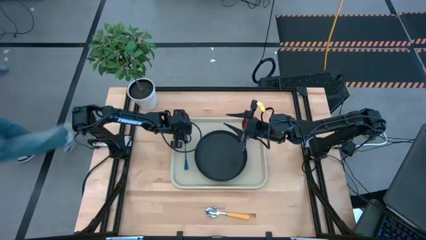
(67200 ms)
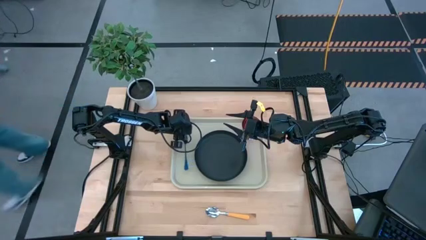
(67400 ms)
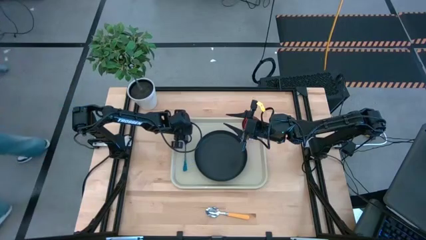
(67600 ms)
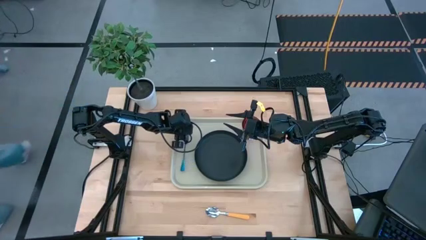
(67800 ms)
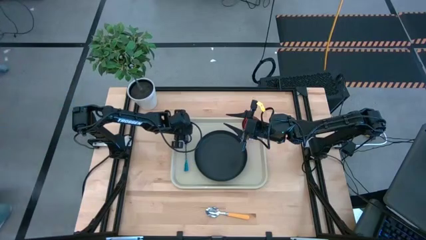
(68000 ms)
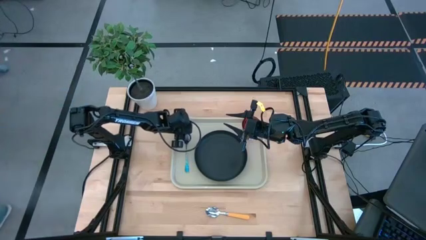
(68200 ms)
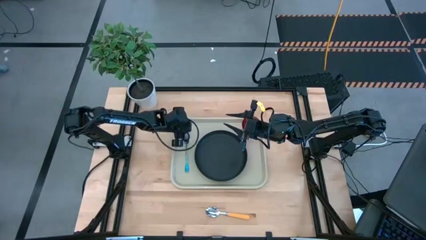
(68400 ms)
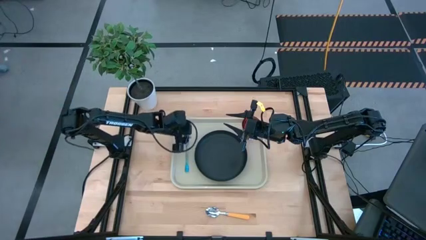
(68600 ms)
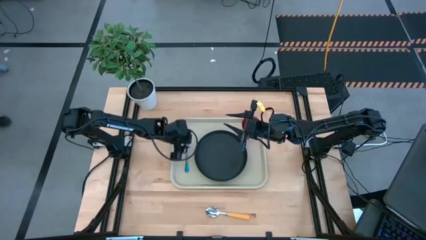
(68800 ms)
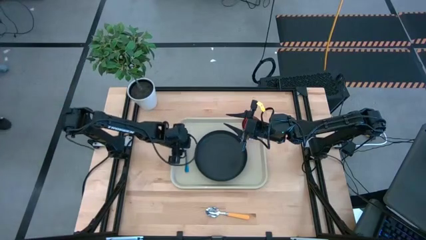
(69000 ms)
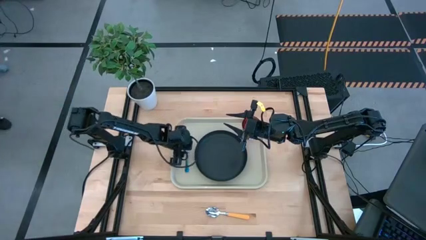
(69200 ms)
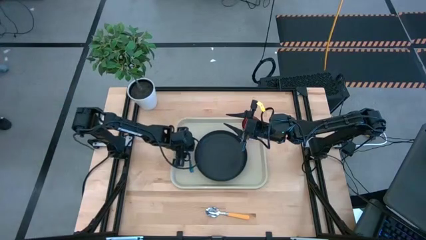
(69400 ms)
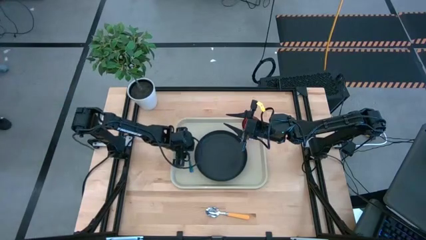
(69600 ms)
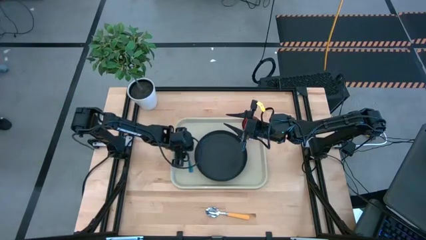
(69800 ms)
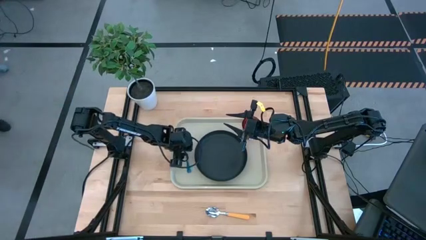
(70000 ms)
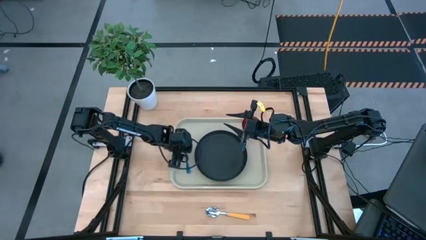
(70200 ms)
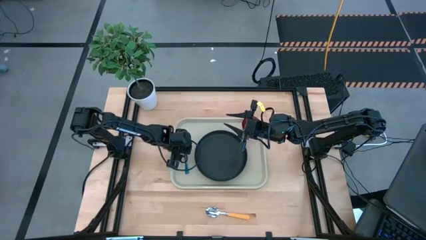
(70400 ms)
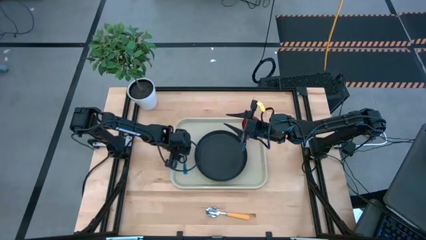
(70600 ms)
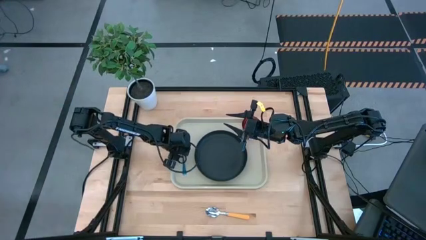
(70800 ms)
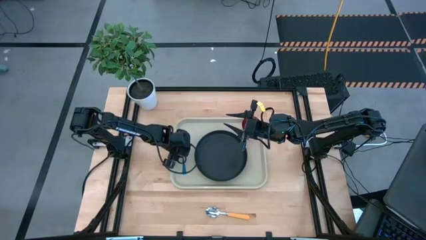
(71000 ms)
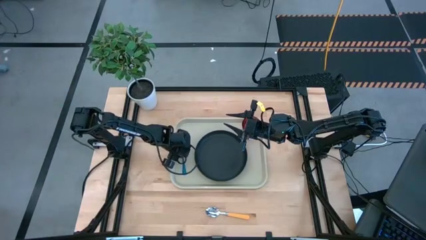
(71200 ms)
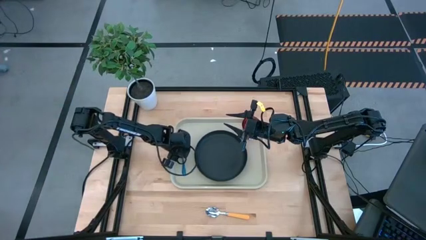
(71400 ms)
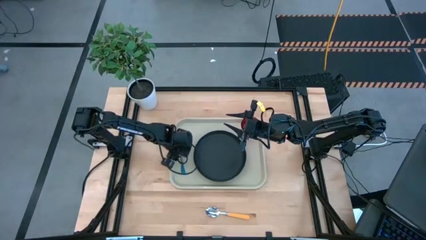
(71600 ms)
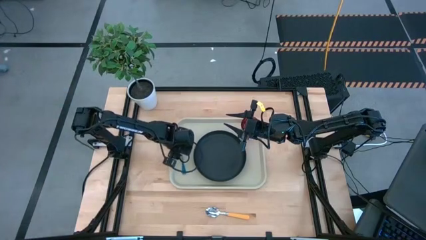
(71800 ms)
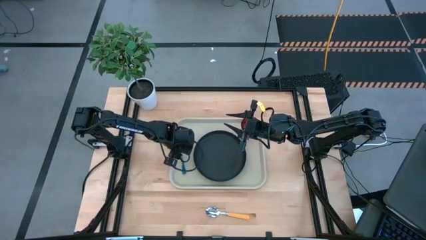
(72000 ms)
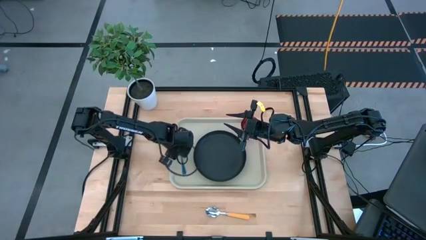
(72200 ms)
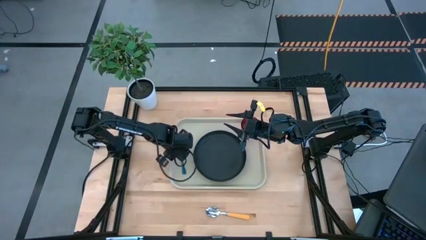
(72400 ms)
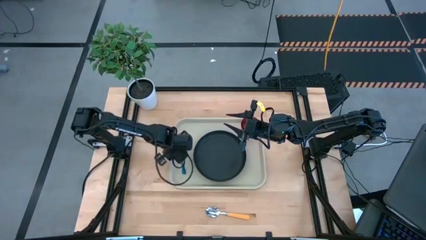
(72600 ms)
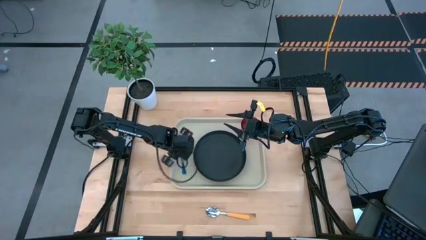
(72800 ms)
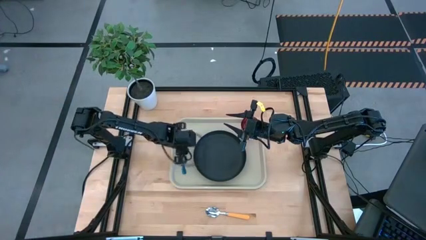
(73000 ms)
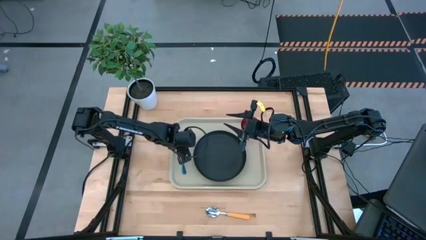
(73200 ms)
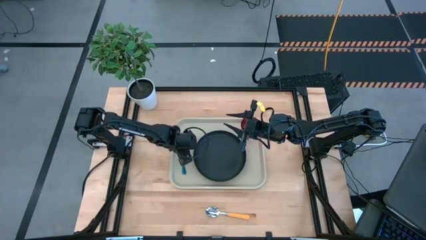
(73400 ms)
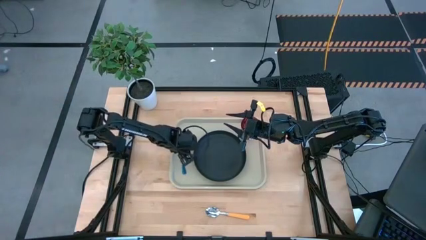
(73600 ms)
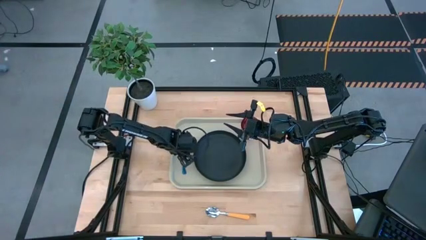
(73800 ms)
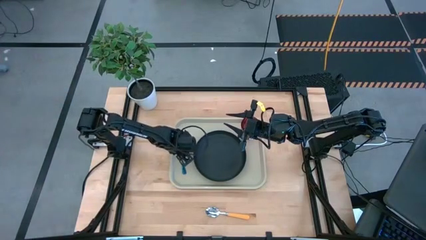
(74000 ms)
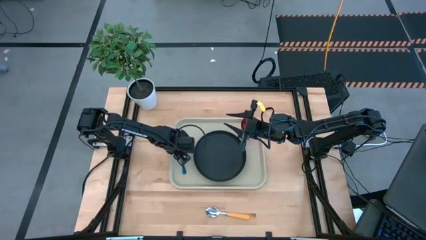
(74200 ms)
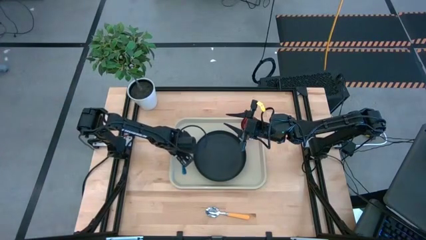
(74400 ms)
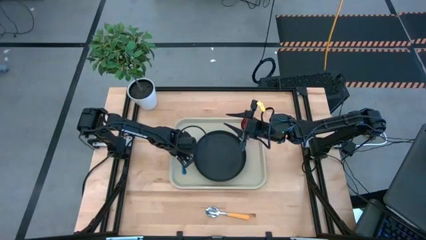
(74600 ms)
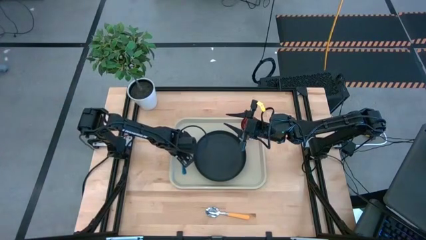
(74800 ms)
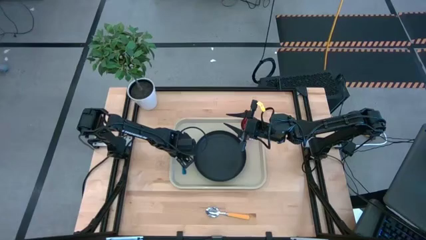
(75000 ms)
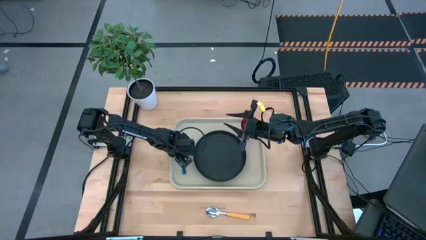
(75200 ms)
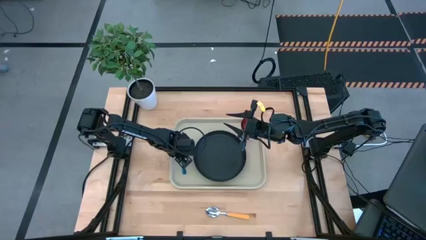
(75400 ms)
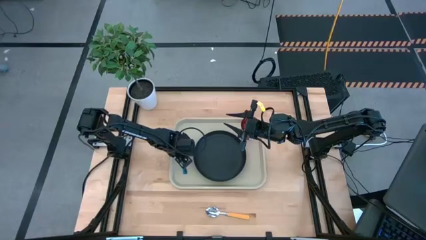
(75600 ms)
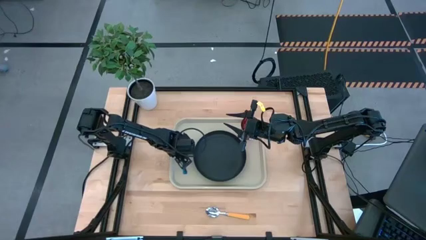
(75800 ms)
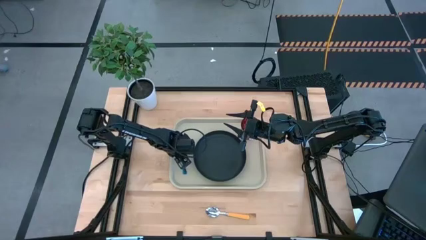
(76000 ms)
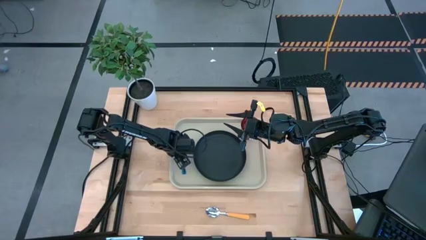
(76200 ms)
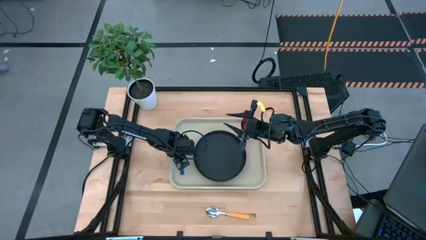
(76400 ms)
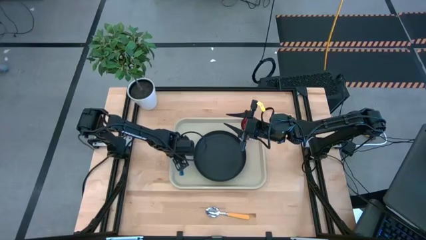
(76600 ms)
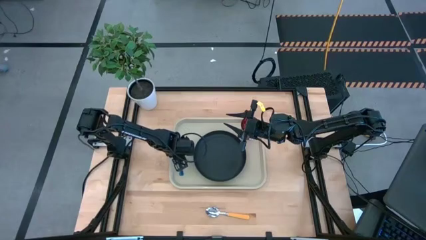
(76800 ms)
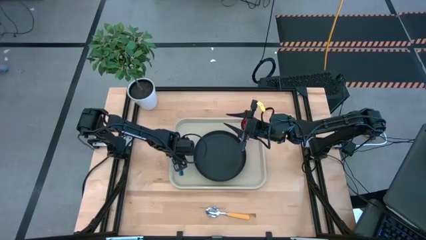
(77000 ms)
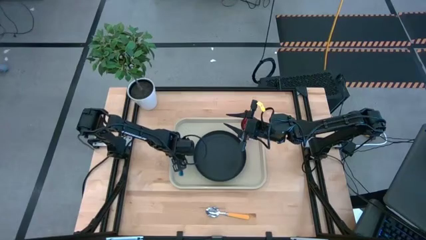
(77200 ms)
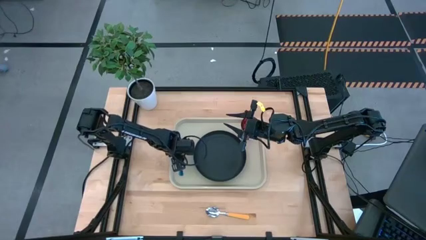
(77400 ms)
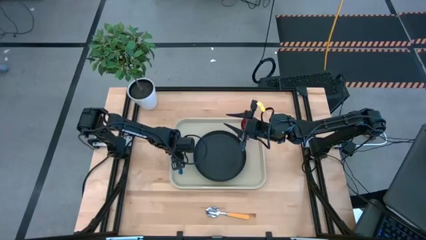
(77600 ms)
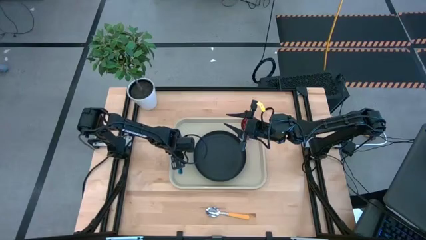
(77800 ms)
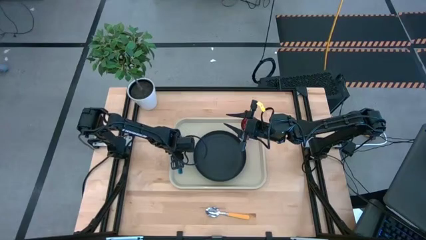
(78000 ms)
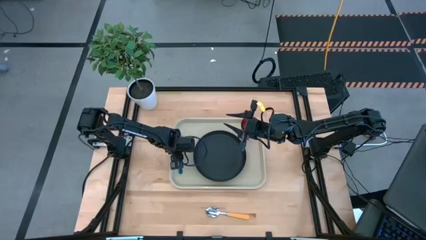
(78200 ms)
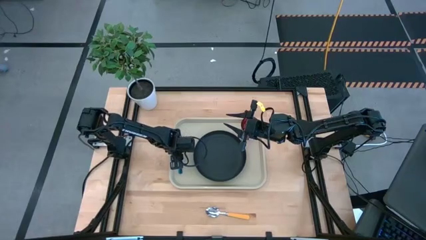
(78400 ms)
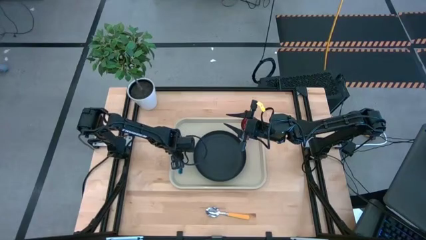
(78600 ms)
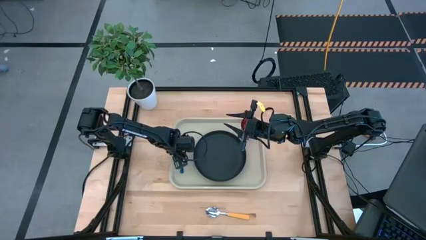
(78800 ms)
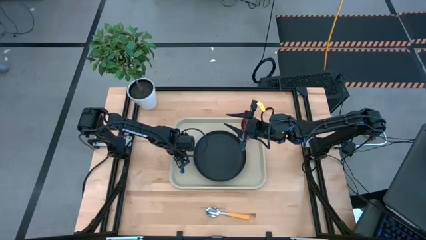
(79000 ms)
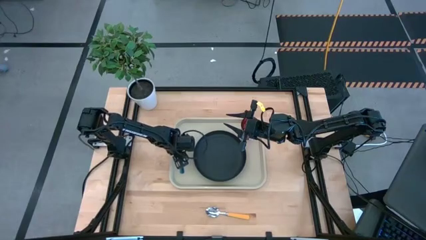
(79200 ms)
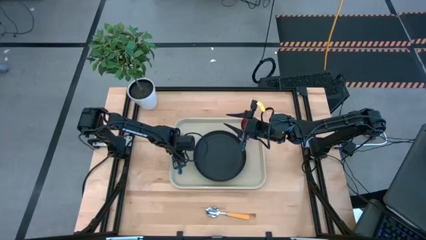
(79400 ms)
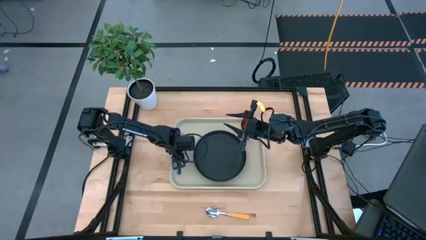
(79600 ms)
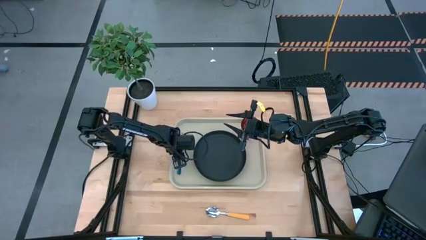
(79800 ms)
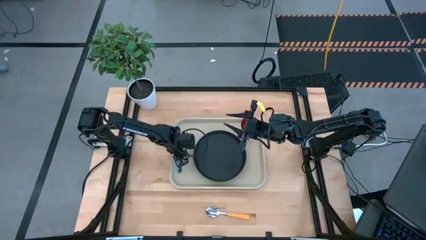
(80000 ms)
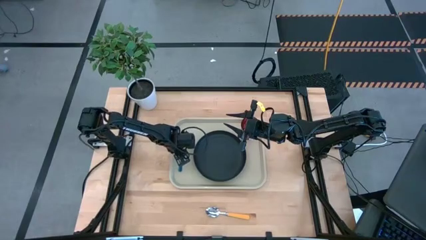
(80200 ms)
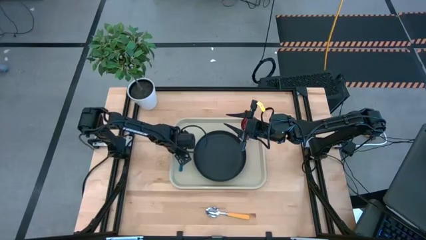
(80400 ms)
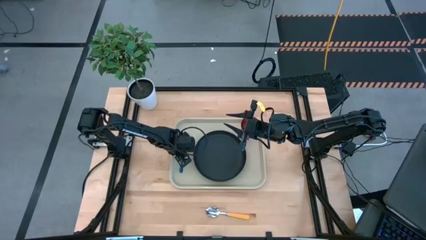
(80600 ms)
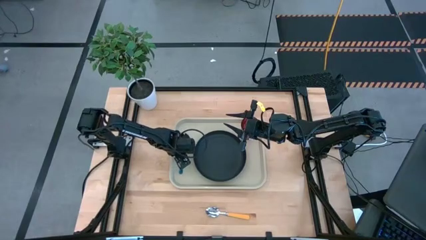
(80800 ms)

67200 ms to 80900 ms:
Task: Pick and place plate/cup/fork/spoon on tray
Put the blue fork on the gray tray to the left of the black plate

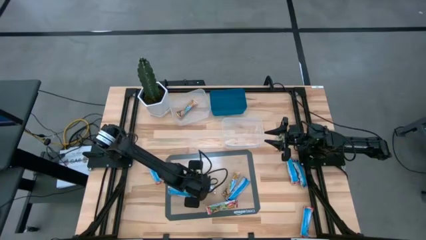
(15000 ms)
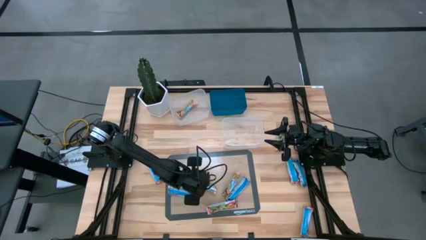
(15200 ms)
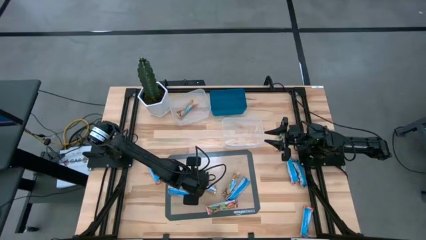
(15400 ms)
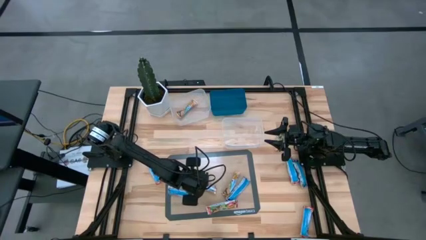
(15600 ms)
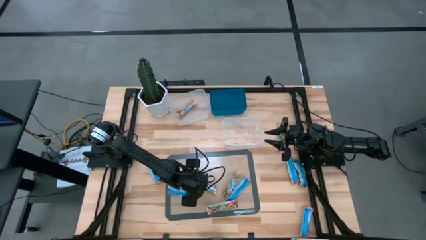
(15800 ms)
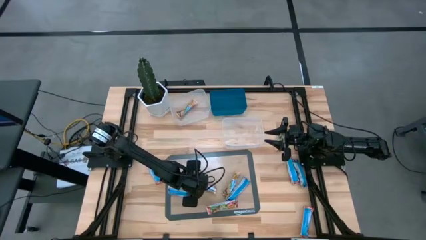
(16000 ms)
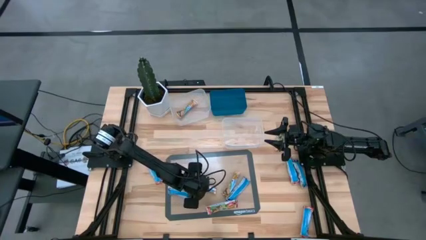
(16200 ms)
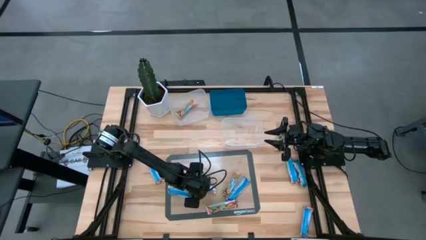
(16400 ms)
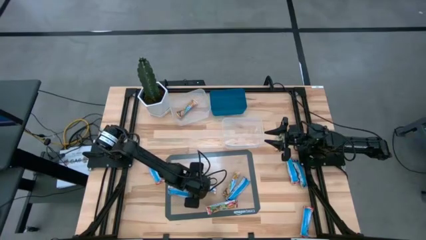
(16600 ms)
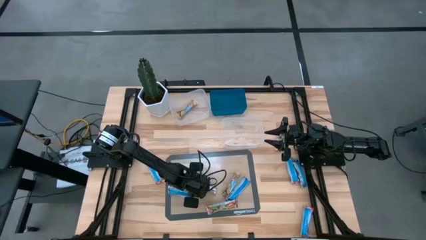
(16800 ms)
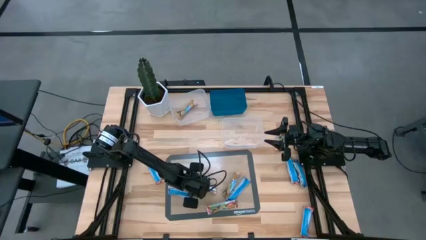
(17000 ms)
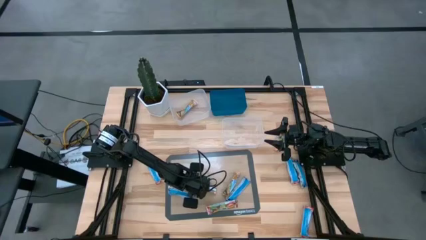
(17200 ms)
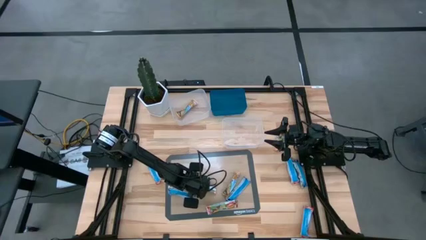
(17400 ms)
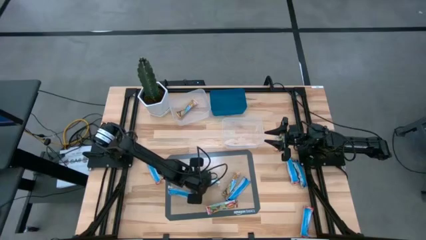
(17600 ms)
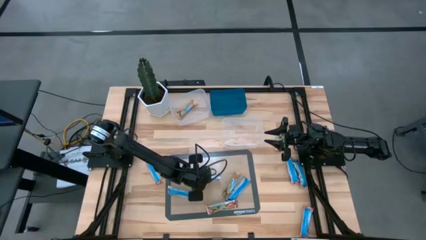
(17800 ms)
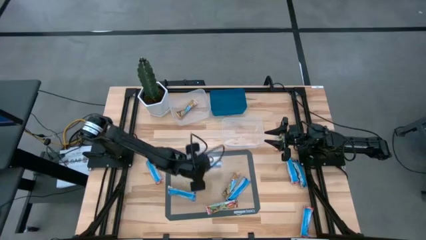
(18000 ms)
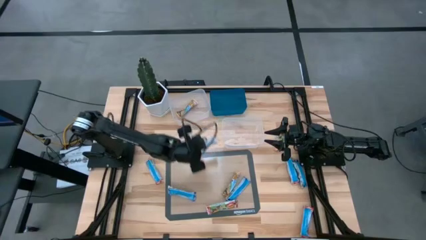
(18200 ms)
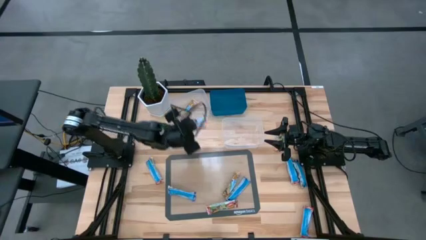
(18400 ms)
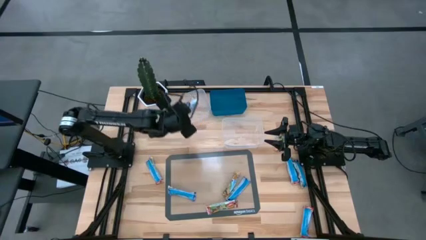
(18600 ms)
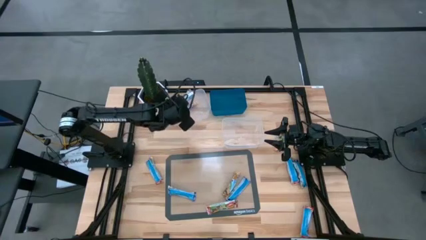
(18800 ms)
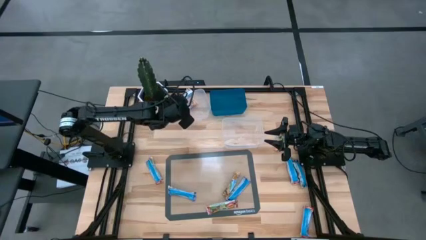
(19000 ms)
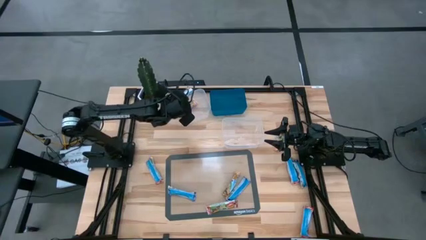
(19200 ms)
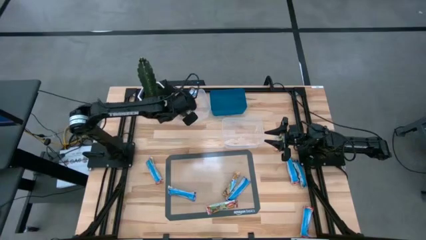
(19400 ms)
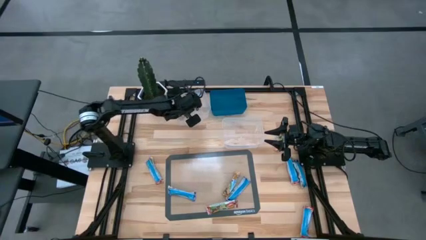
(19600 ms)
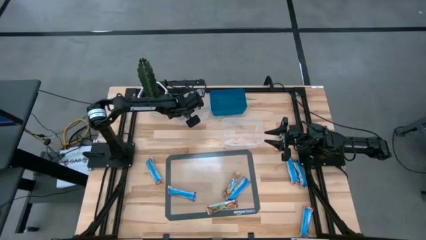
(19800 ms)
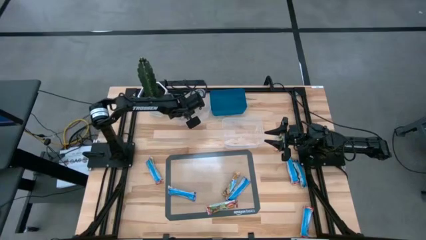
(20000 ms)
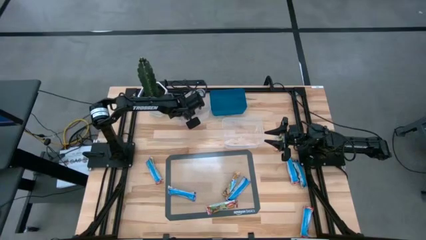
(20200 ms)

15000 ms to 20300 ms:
Task: Pick and place Granola Bars by type
Put the yellow granola bar into the top transparent bin
